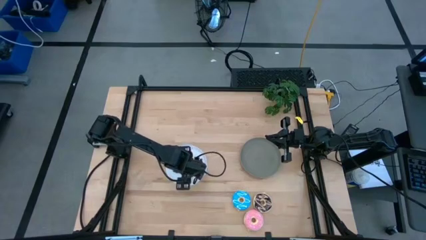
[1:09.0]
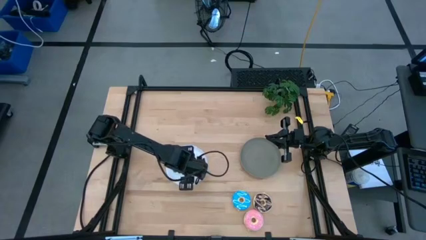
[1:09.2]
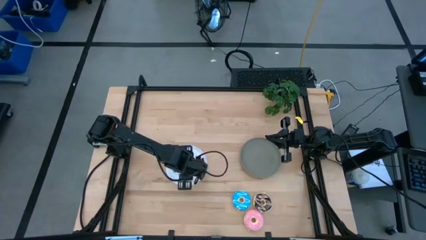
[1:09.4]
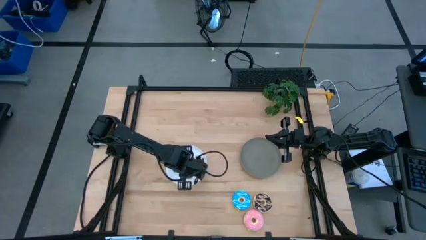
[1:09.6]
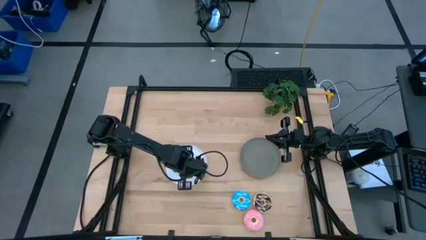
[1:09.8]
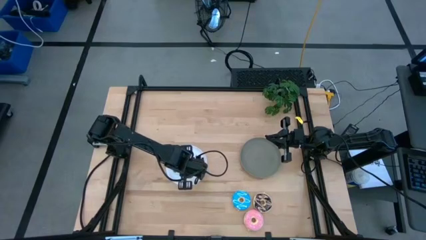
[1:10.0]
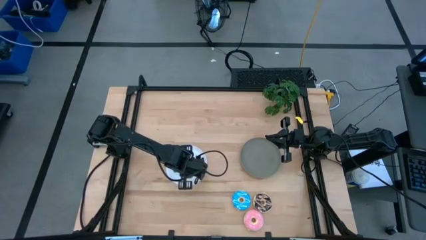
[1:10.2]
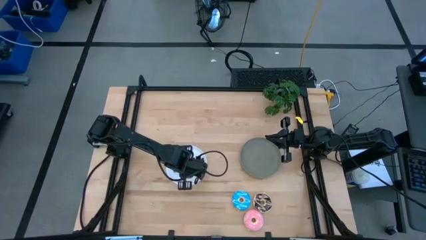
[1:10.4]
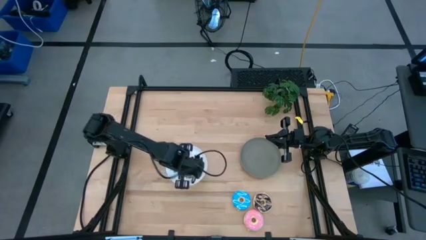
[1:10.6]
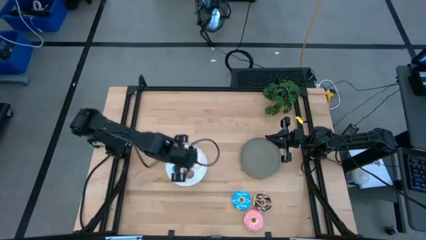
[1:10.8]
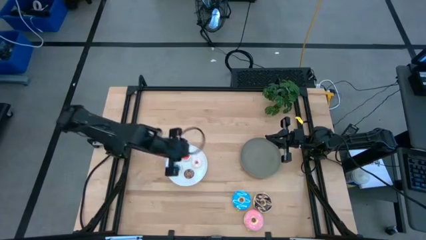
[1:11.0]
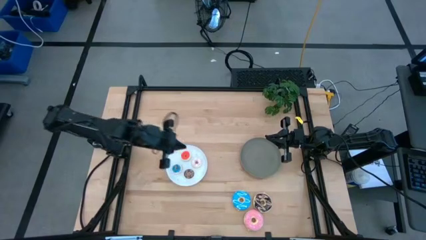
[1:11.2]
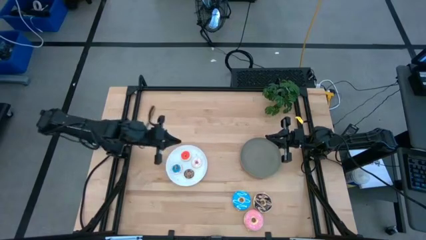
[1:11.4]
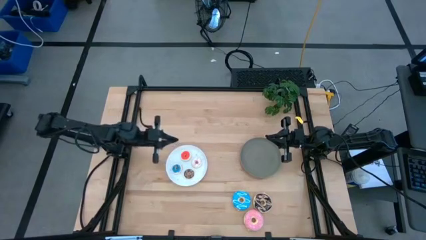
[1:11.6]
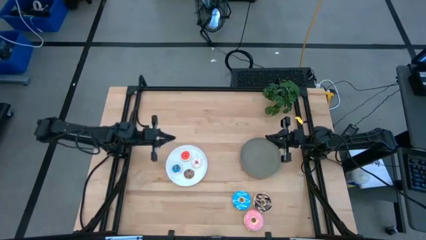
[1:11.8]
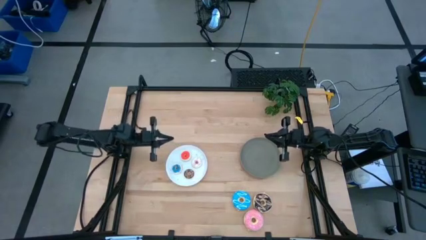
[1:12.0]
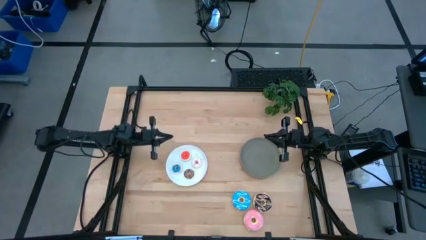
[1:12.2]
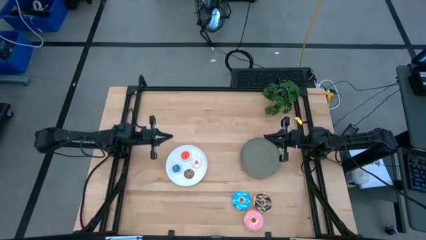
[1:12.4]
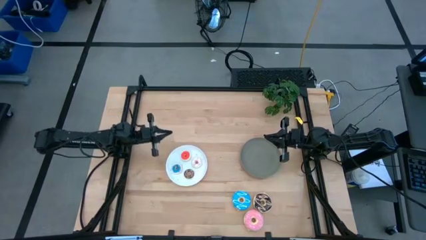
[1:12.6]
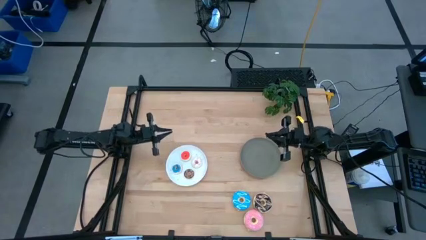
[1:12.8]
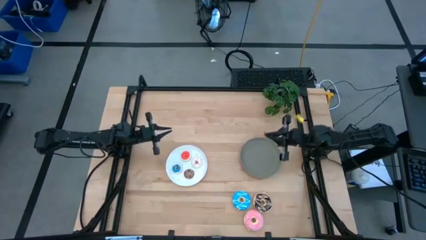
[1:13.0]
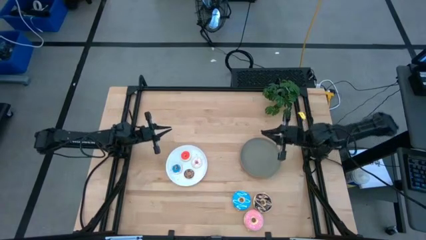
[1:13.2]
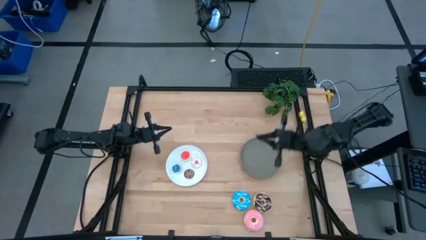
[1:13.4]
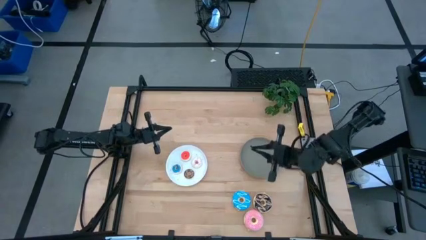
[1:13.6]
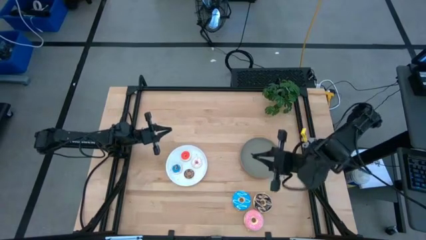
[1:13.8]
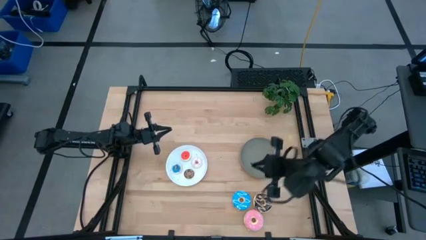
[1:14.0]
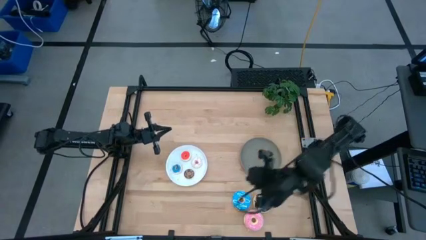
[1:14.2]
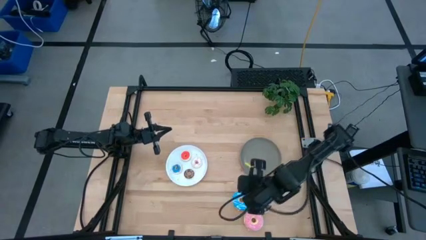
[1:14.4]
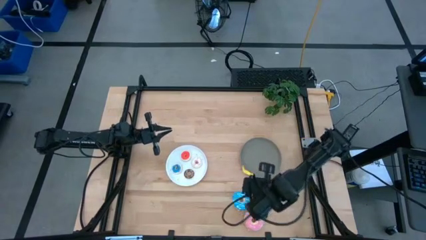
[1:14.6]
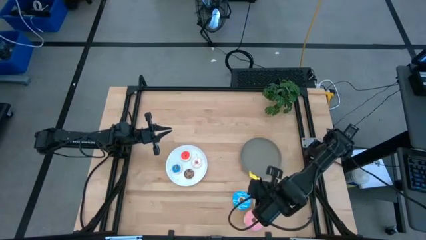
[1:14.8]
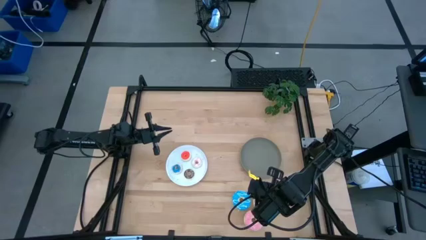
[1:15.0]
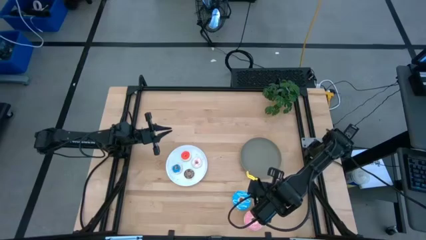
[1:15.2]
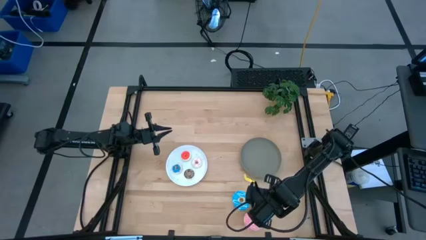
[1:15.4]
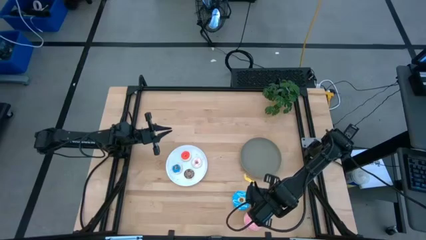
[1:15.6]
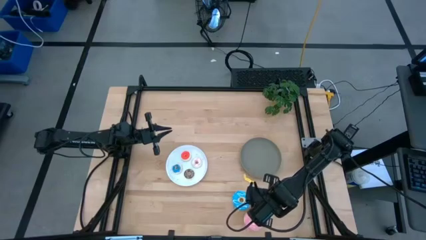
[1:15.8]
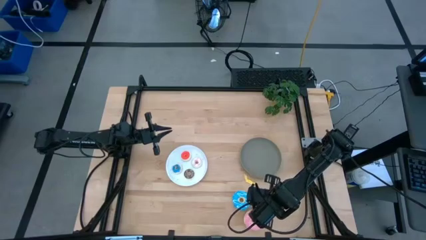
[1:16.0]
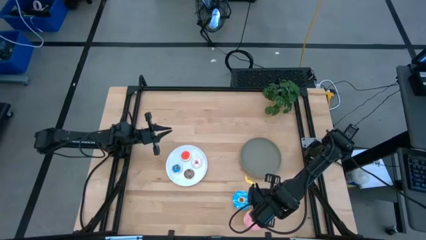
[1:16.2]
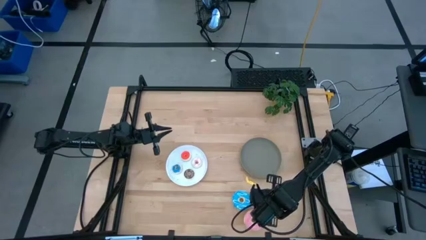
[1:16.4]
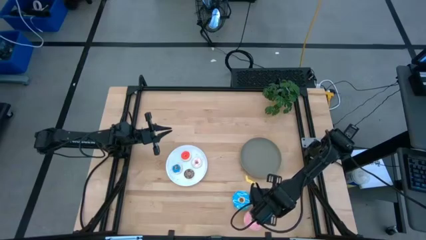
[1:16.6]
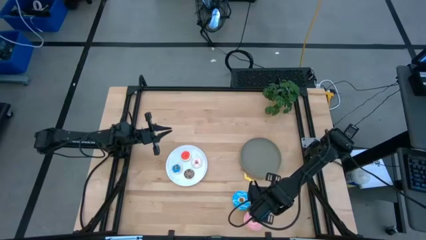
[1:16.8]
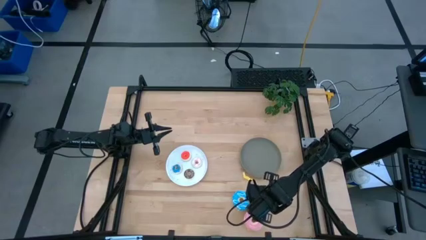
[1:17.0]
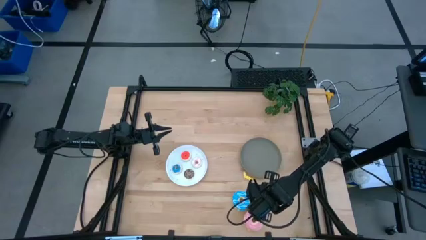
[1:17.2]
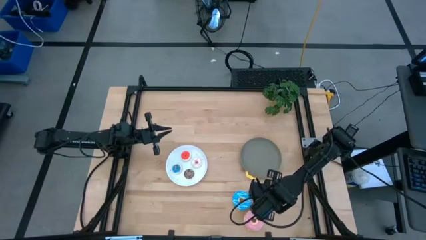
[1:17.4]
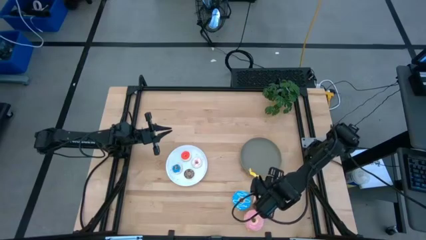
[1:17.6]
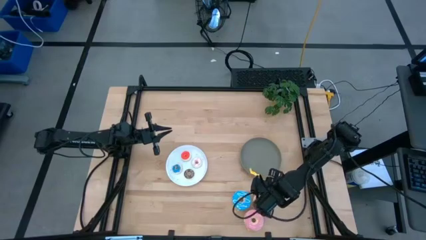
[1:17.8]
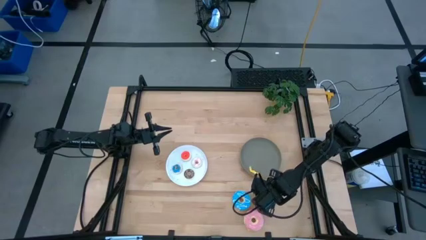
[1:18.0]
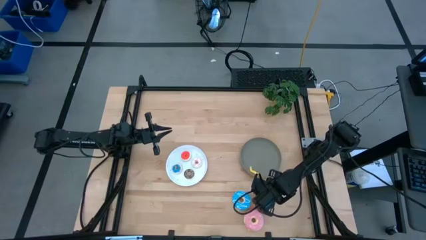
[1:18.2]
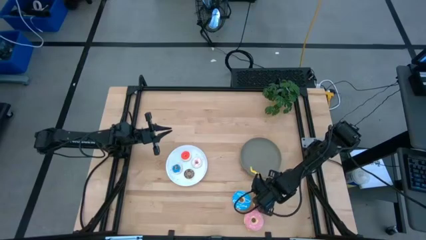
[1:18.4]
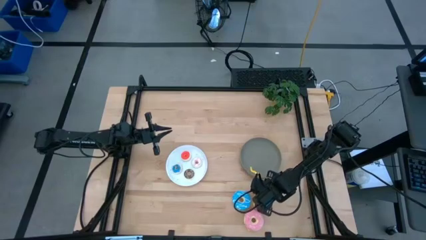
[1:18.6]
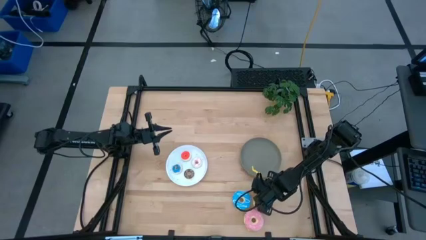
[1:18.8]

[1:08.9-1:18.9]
Task: Pick & Place donuts
Put the large black donut on the gray plate

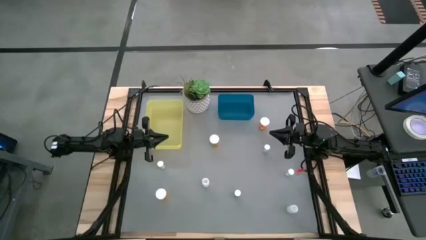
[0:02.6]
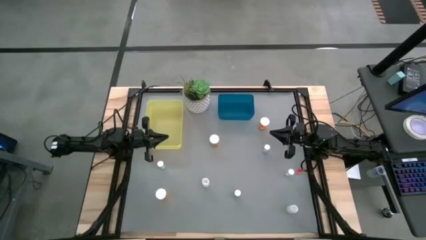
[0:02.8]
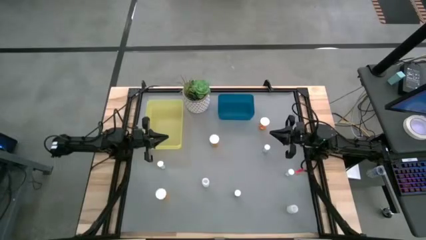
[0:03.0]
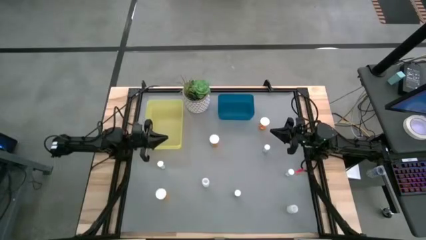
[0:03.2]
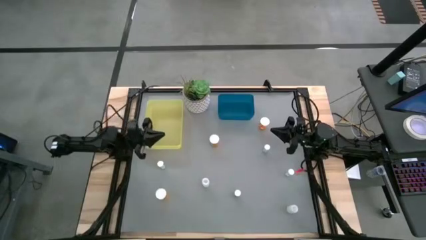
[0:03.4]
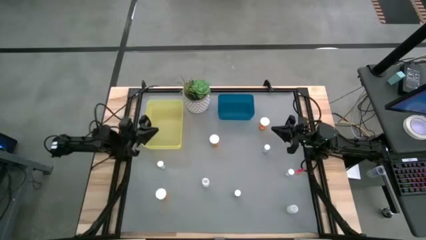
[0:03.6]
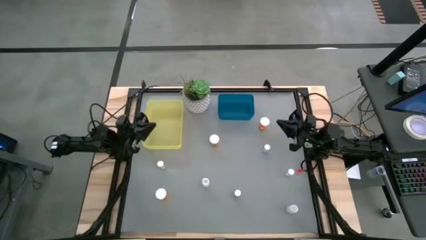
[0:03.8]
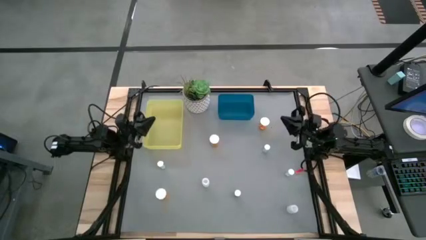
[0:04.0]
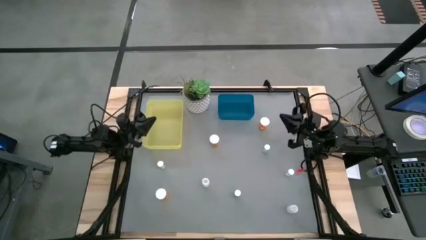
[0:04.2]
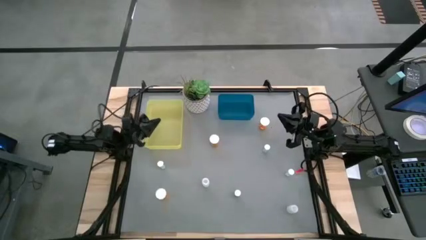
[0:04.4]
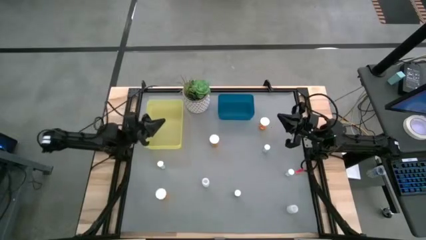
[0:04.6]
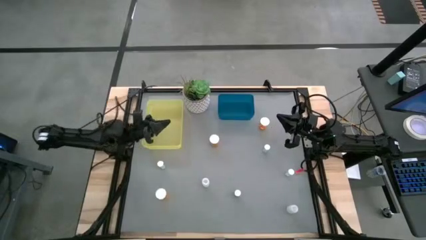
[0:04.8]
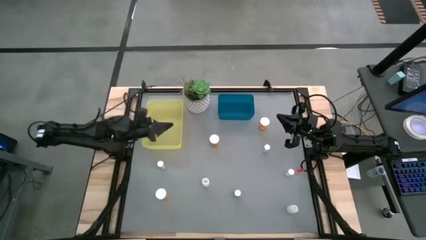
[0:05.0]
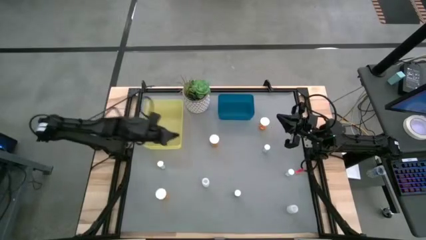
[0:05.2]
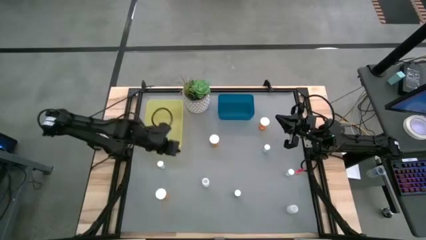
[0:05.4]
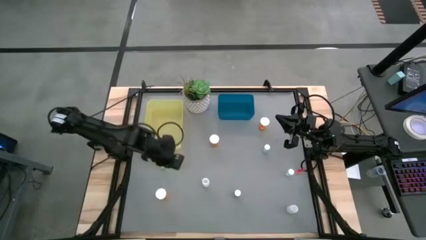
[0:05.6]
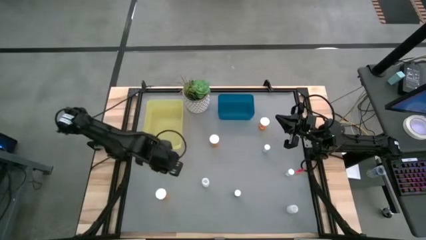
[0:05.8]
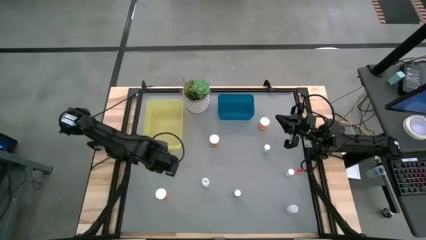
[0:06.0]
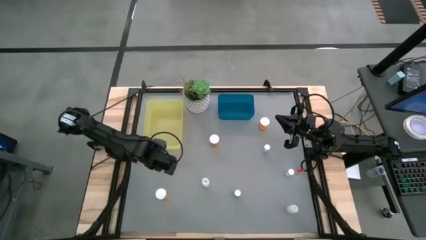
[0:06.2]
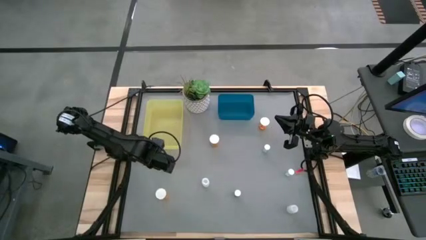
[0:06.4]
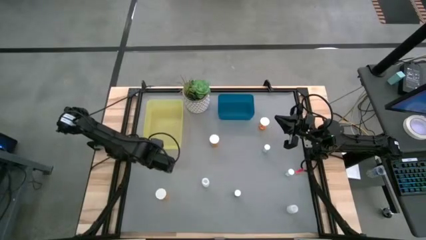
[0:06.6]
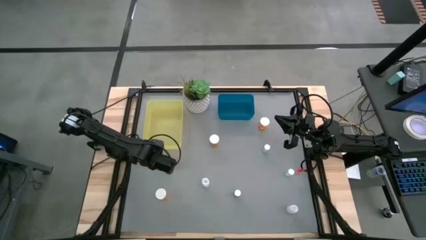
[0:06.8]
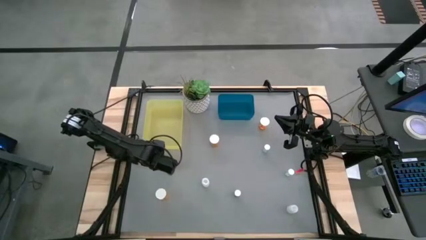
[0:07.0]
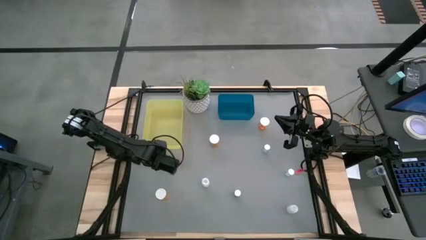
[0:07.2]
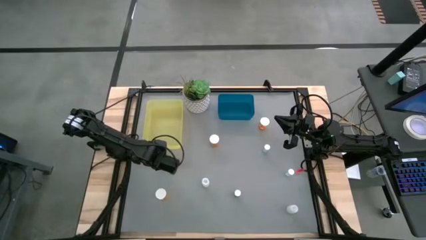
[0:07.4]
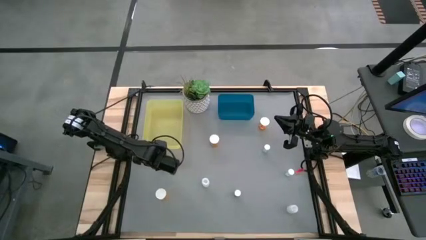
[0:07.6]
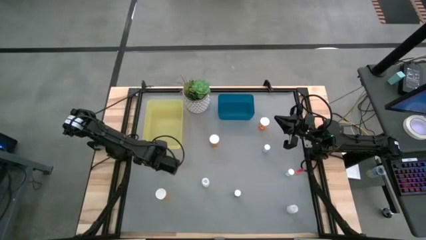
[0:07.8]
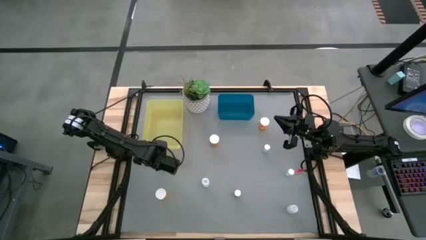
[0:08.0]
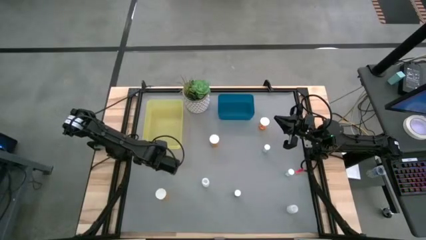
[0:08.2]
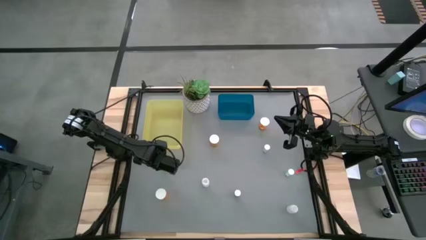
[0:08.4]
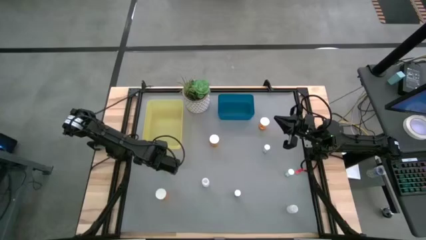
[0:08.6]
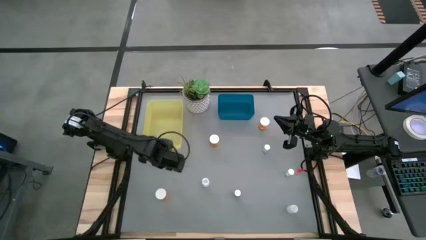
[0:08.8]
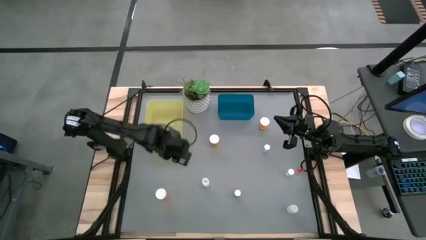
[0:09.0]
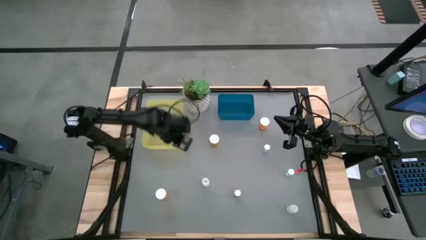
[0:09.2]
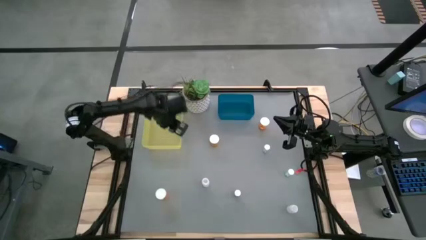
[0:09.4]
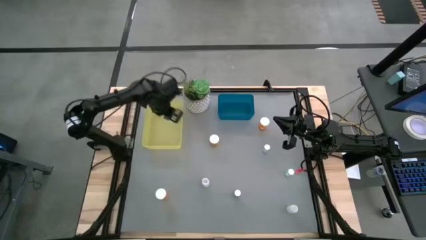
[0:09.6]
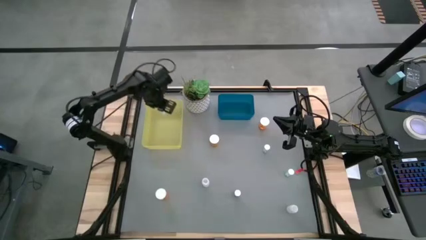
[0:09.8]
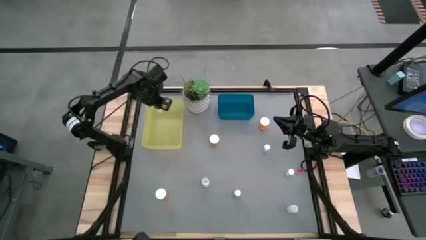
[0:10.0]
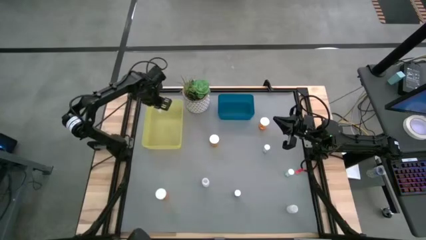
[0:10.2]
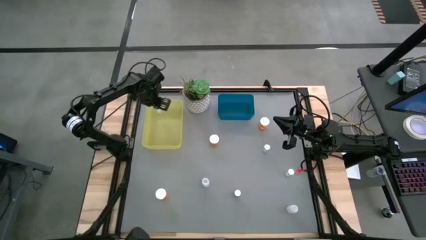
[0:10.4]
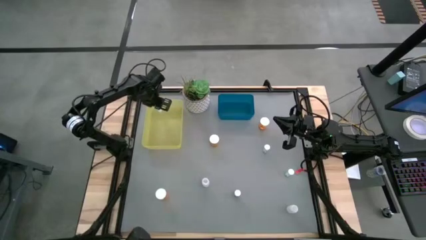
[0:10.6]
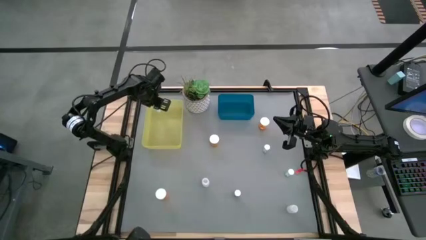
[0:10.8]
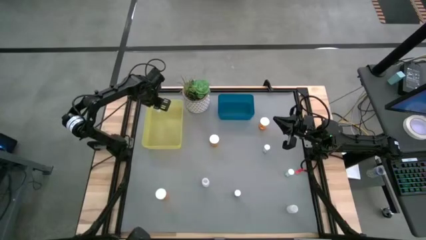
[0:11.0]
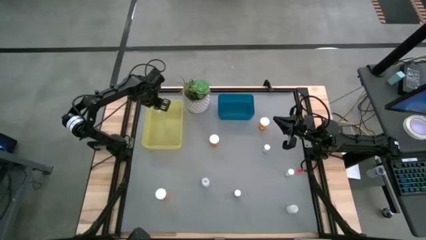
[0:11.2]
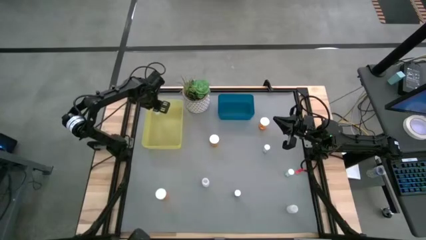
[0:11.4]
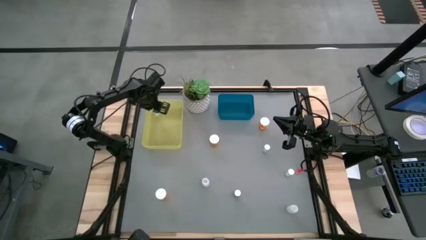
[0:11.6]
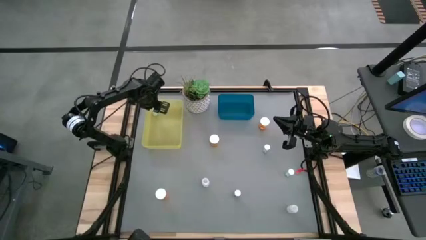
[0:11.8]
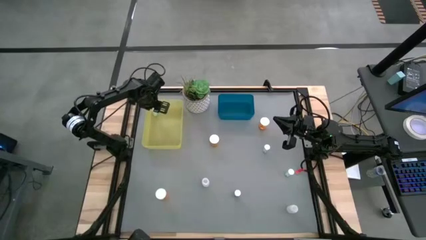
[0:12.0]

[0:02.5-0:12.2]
Task: Pick and place medicine bottles into bin by pill shape (circle, oval)
Put the blue tablet bottle into the yellow bin
